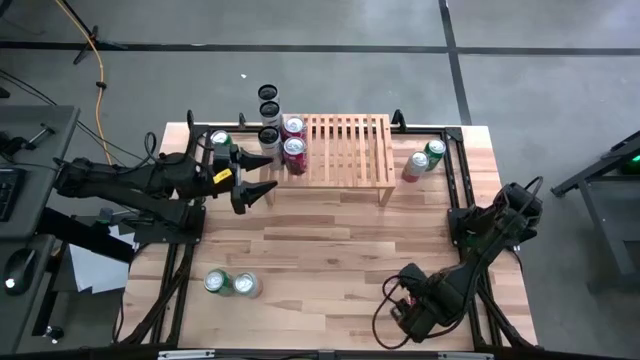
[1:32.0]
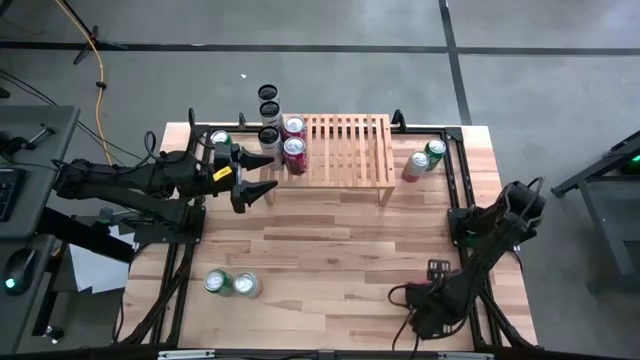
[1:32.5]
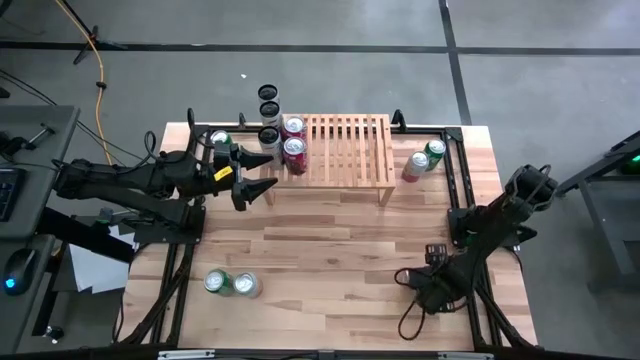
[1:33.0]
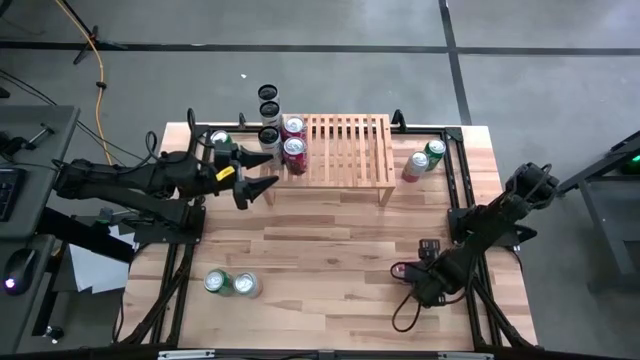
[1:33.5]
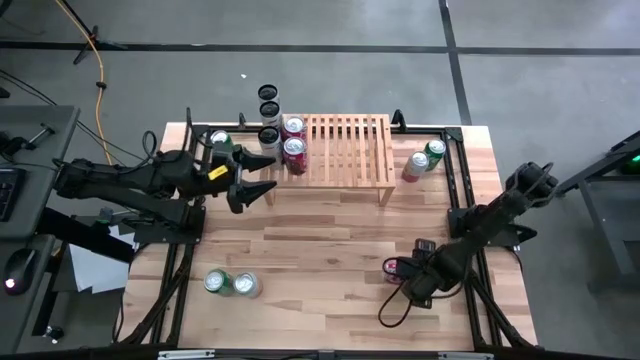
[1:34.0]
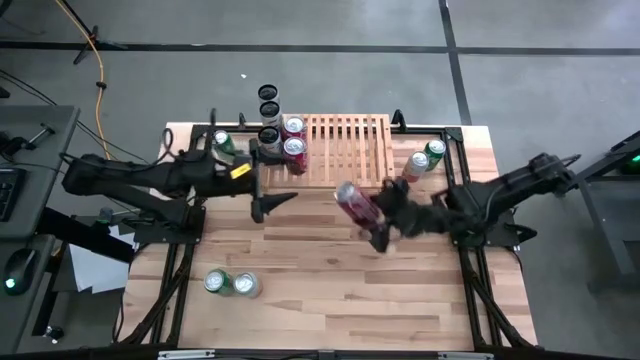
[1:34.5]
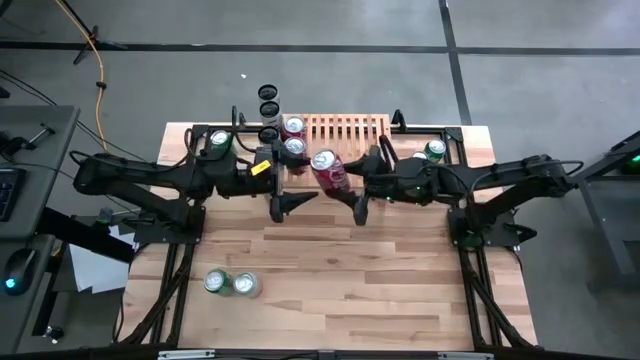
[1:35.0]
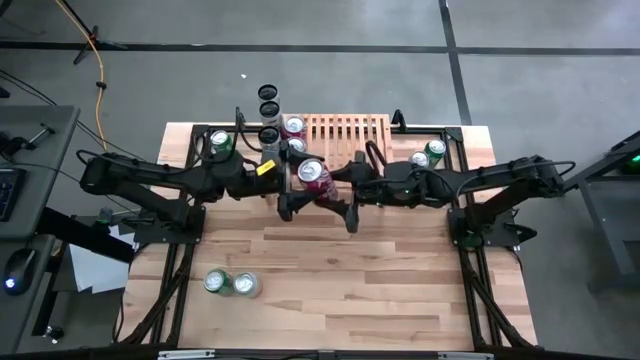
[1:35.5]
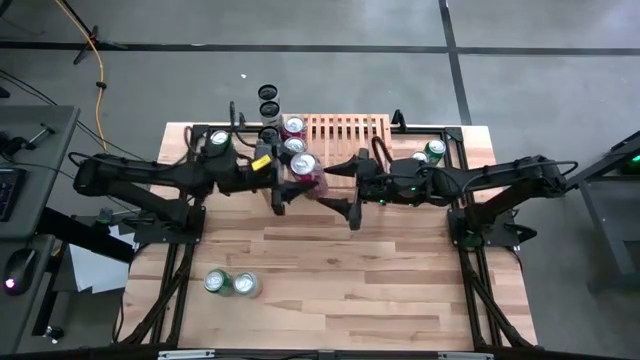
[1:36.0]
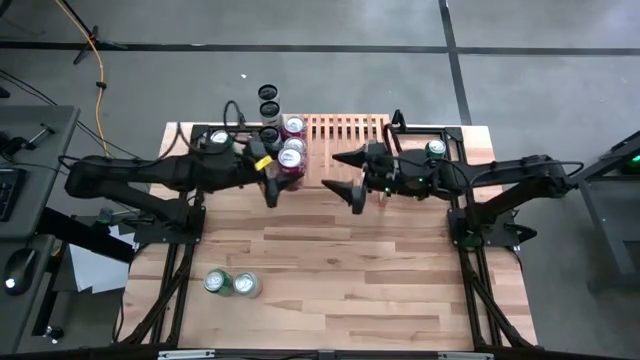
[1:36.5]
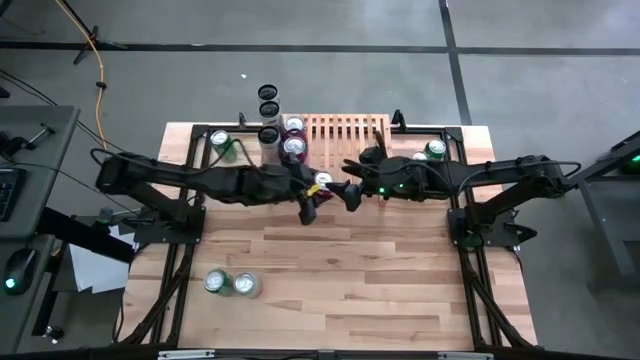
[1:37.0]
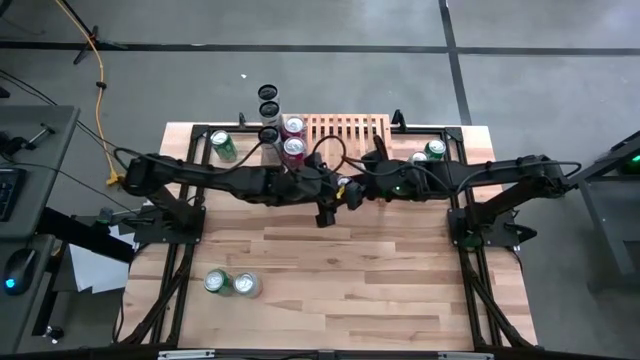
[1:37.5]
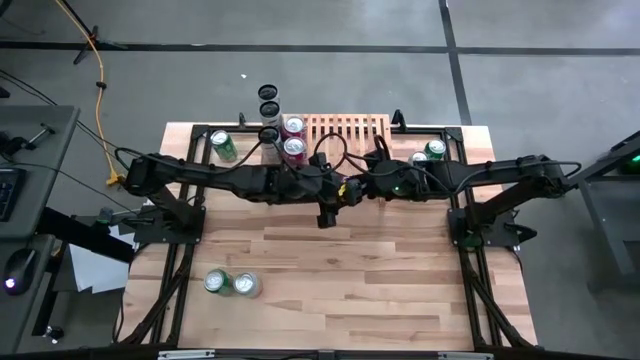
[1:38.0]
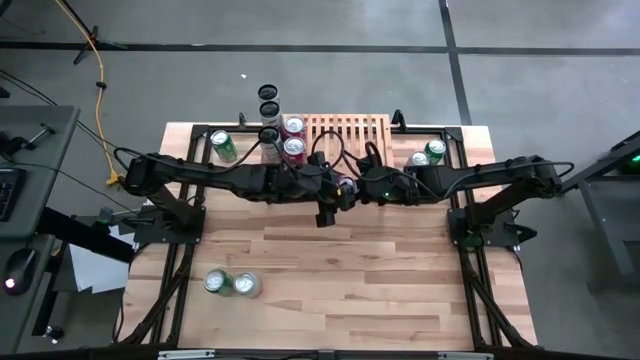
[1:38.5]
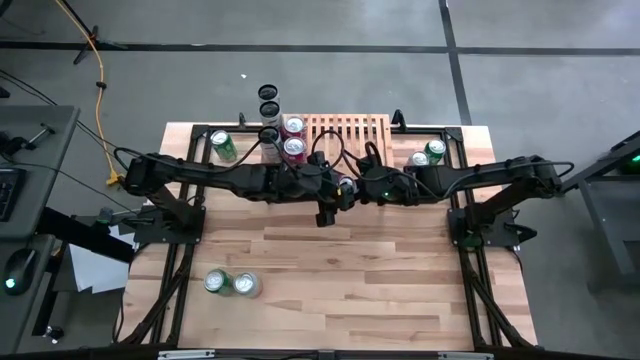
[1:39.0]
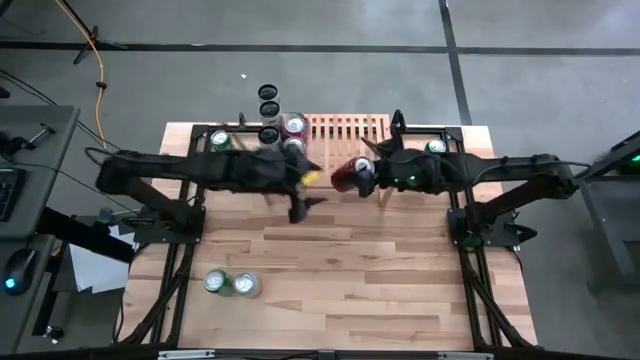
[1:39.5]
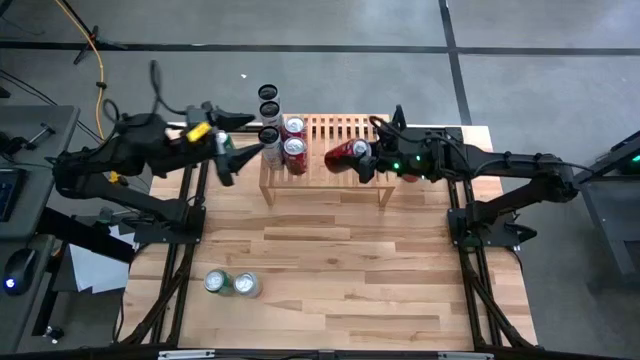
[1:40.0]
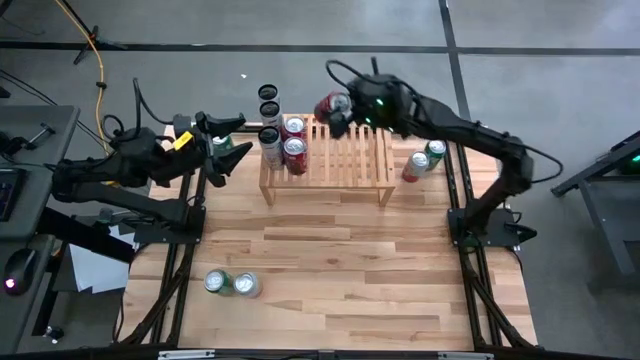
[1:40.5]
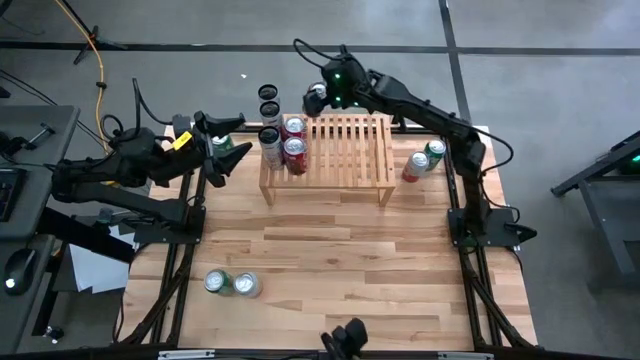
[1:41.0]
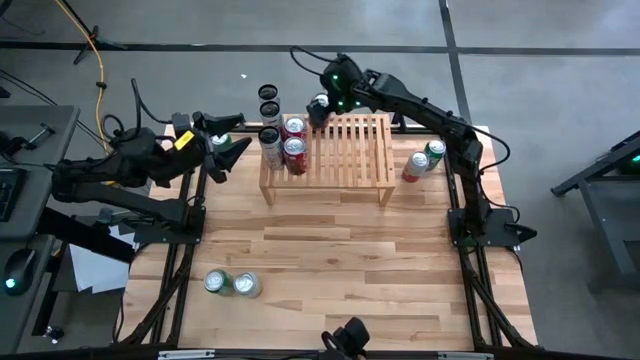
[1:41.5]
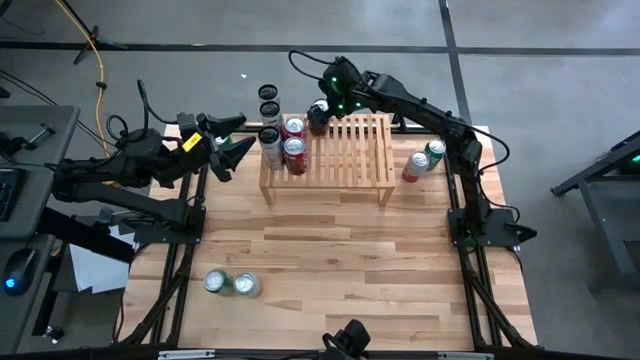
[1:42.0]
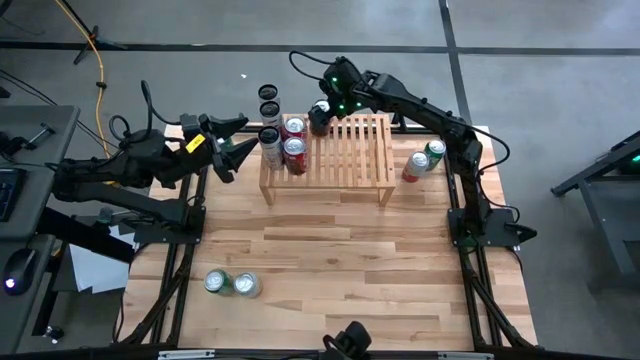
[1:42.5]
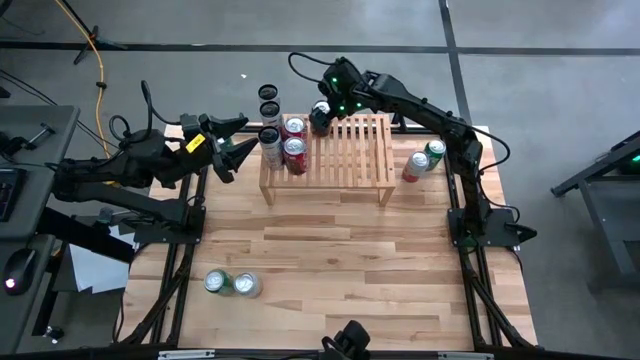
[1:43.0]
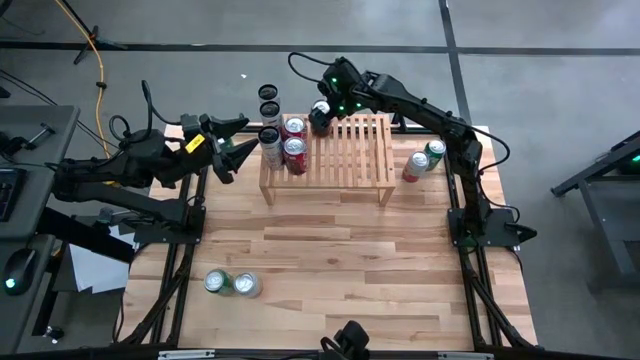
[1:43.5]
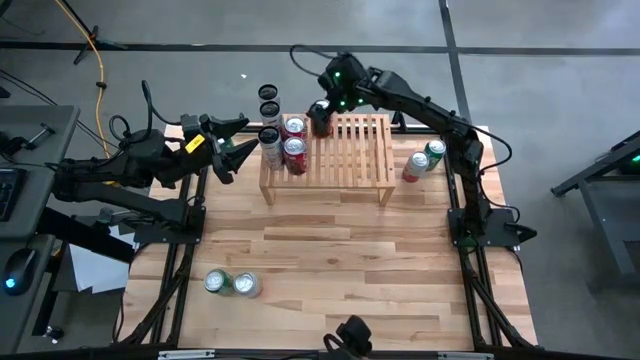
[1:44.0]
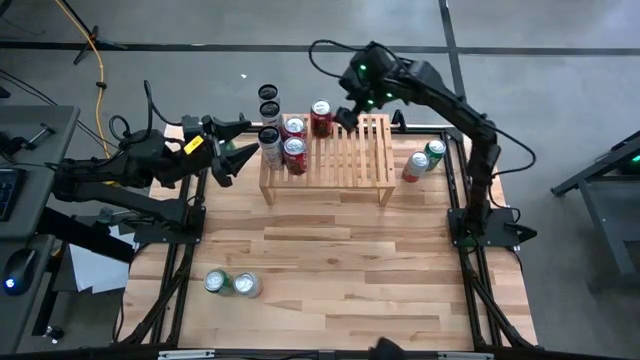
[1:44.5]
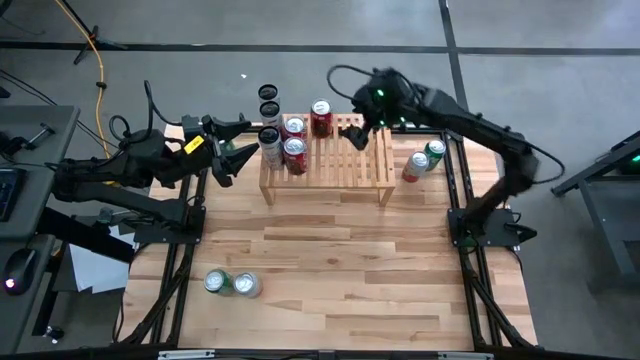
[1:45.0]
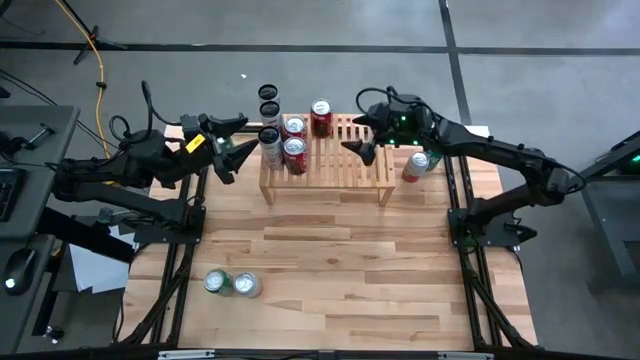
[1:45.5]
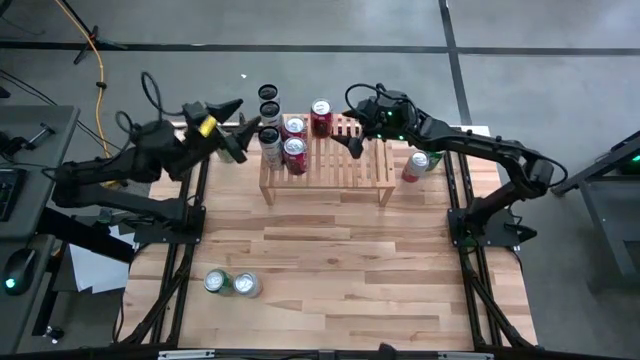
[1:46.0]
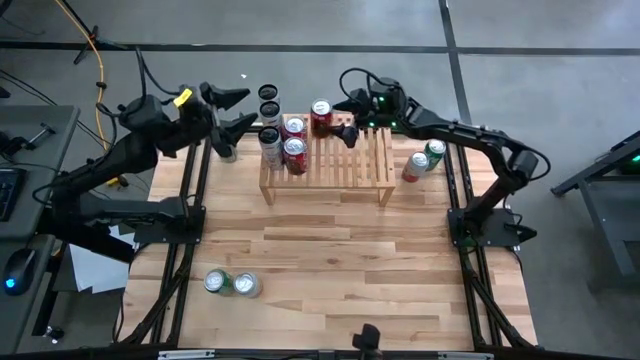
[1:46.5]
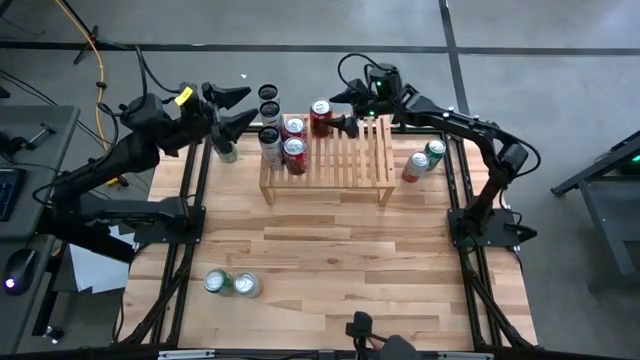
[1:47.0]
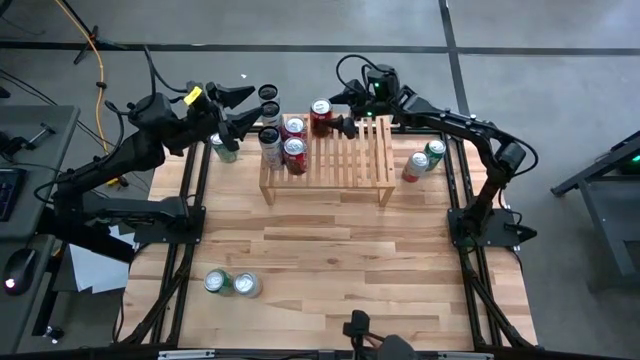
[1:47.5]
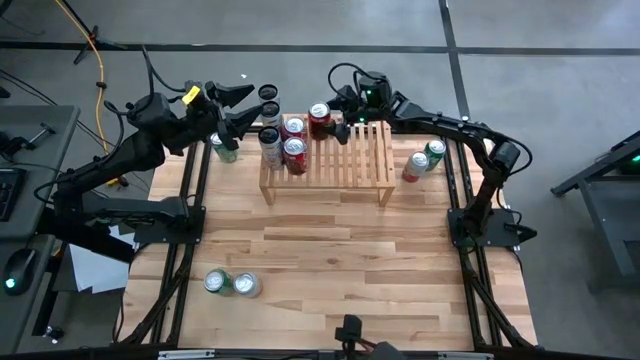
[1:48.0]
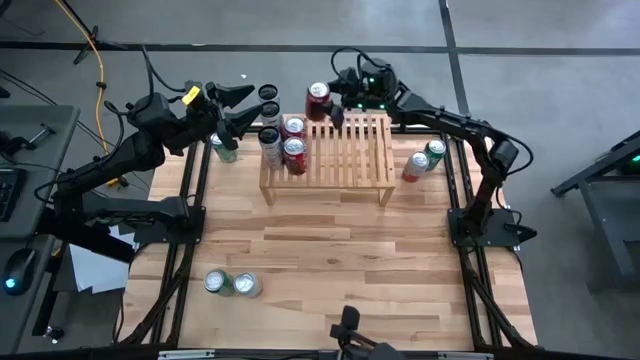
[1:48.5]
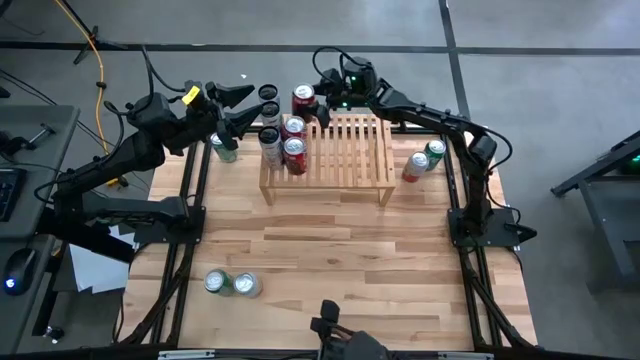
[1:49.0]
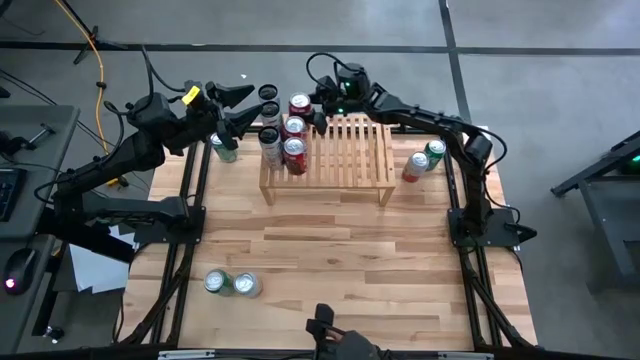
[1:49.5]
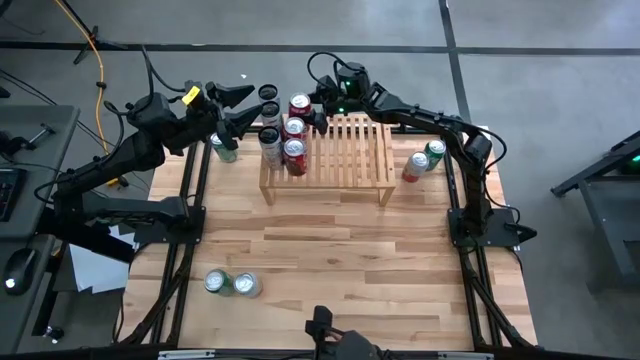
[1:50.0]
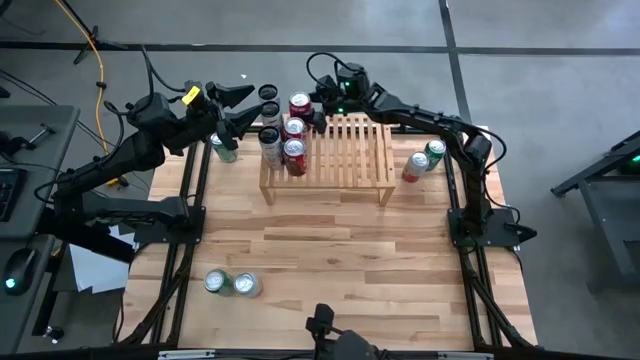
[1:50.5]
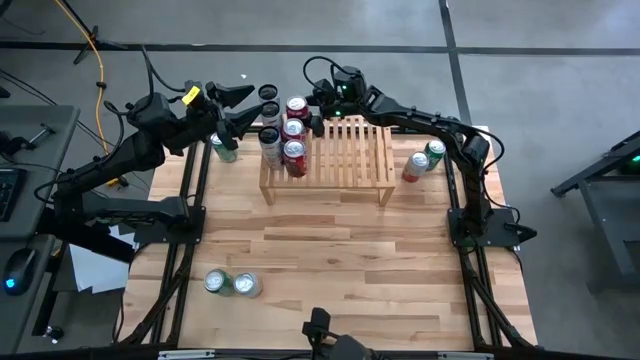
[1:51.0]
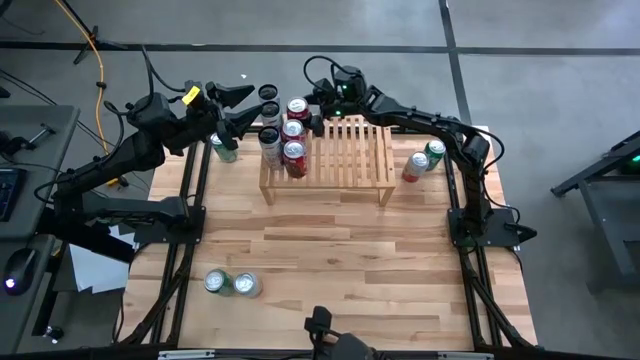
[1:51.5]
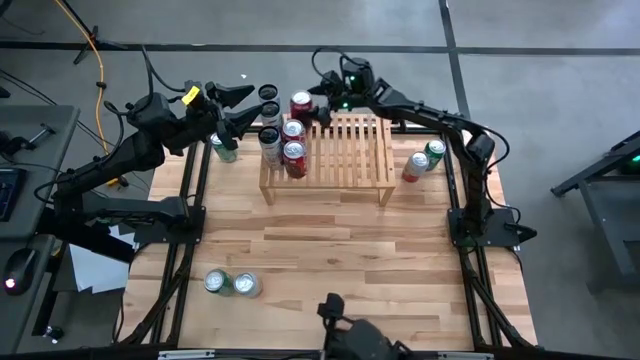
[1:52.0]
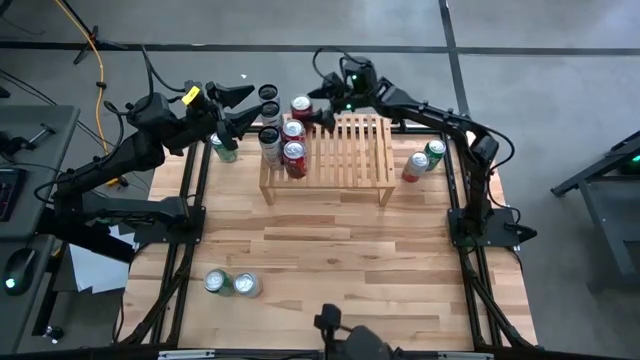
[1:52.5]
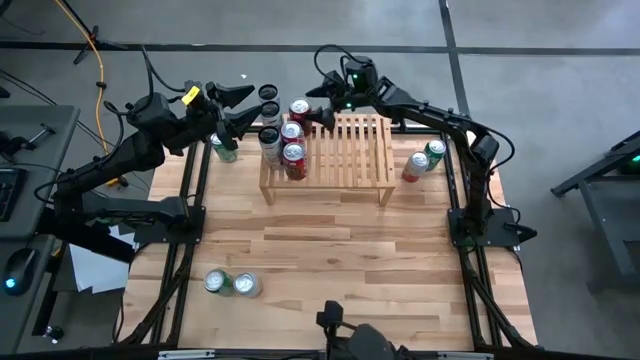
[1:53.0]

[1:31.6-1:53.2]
Task: Place canned beverage on shelf
Put the red-white soda can on the shelf aligned with the other red-white soda cans
